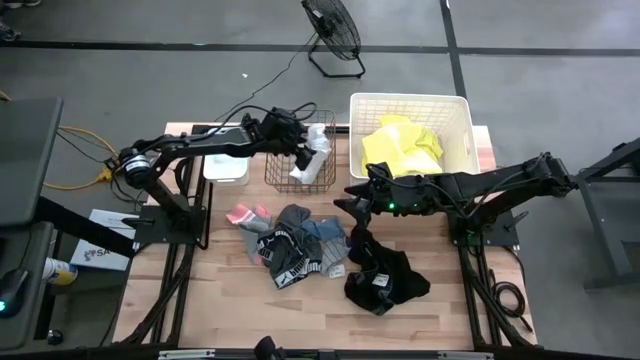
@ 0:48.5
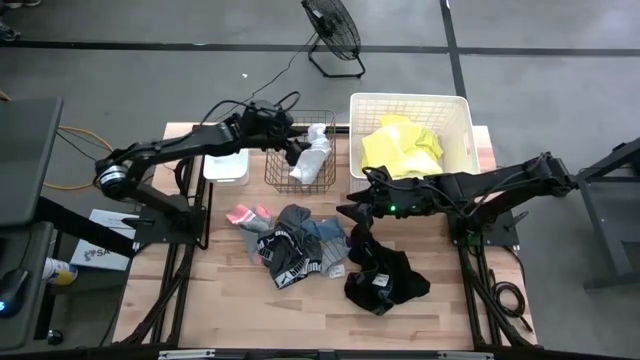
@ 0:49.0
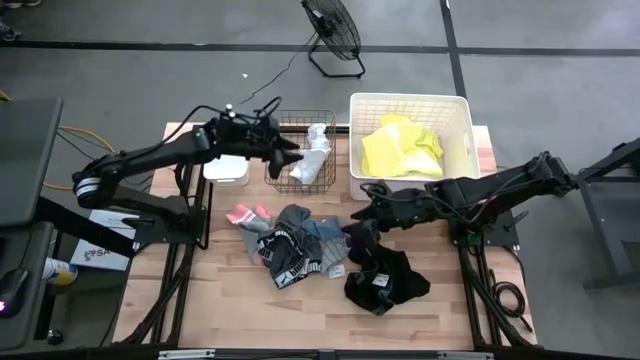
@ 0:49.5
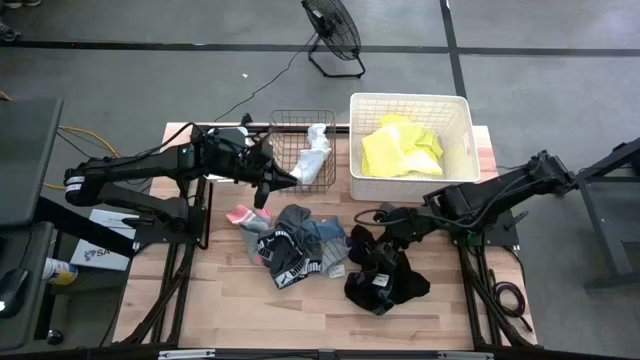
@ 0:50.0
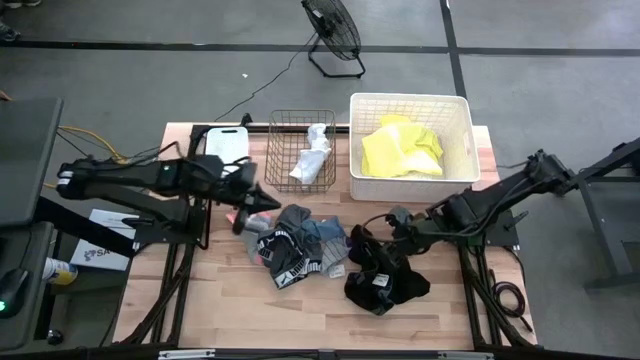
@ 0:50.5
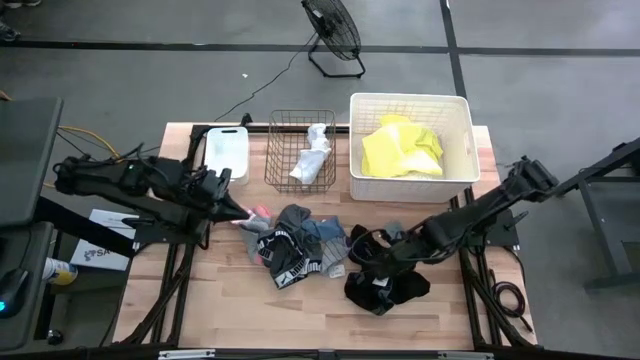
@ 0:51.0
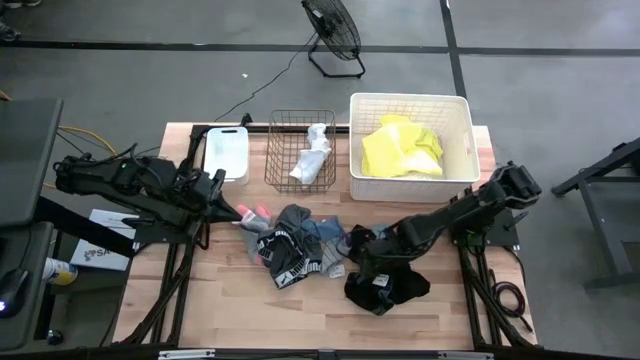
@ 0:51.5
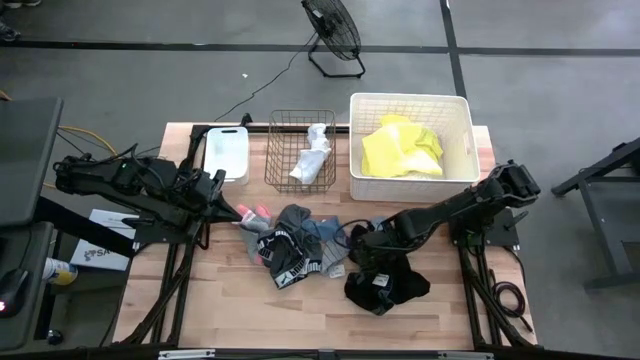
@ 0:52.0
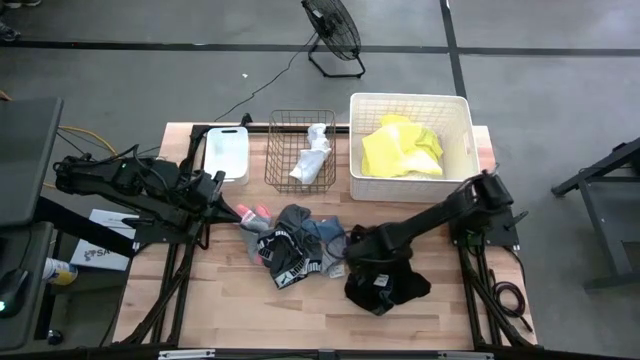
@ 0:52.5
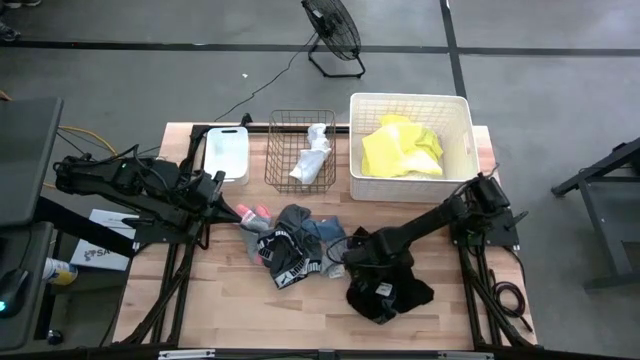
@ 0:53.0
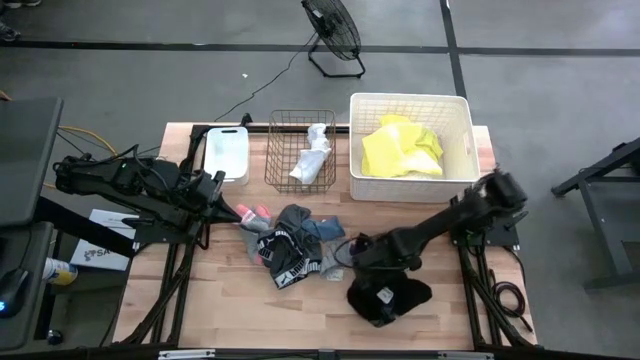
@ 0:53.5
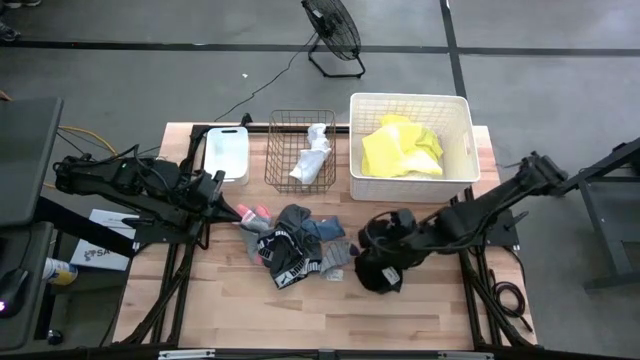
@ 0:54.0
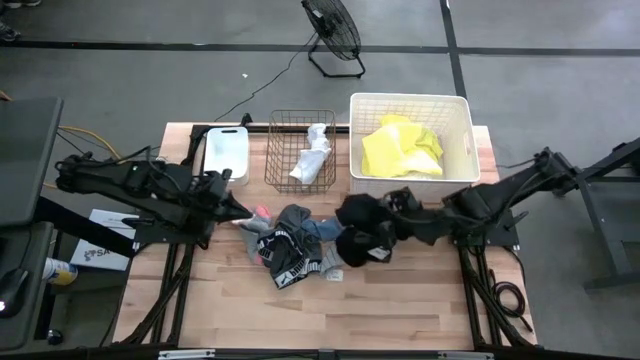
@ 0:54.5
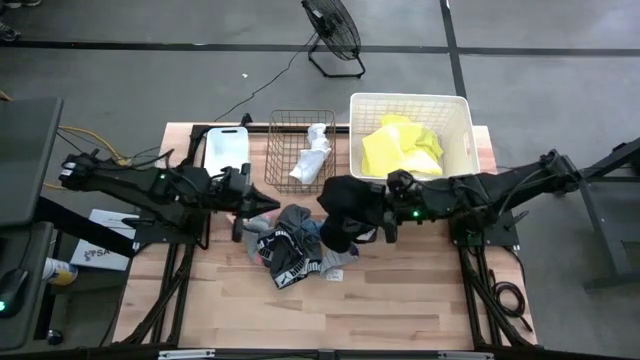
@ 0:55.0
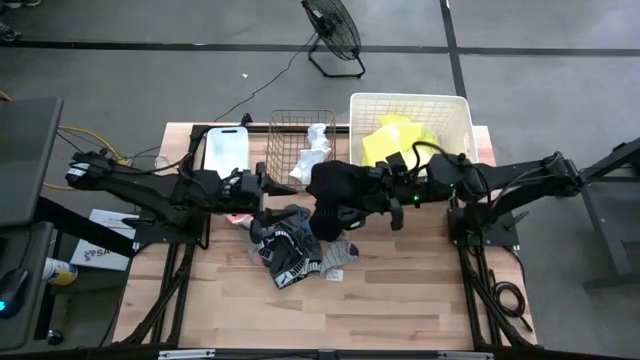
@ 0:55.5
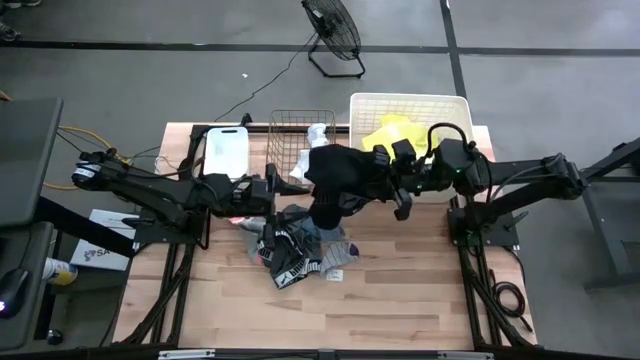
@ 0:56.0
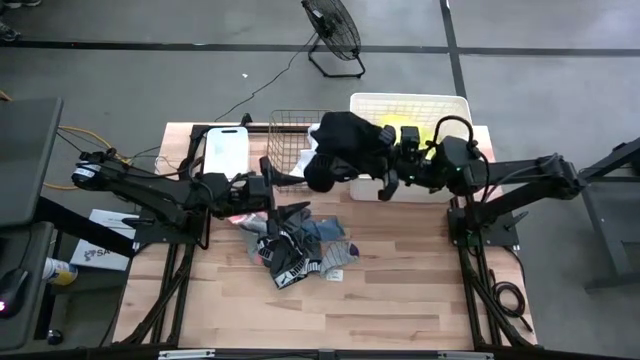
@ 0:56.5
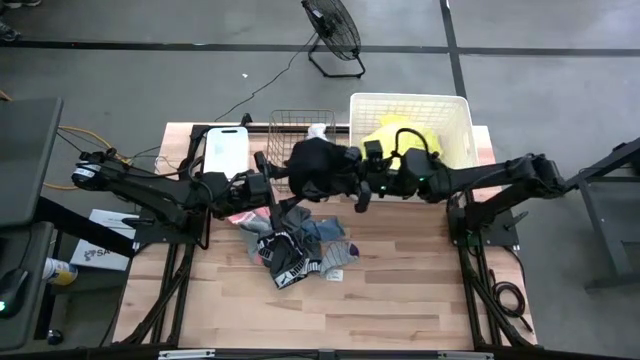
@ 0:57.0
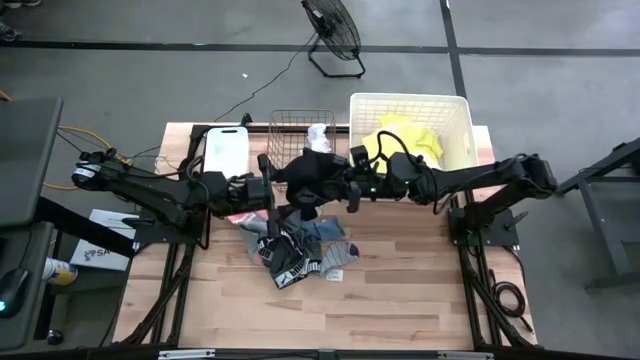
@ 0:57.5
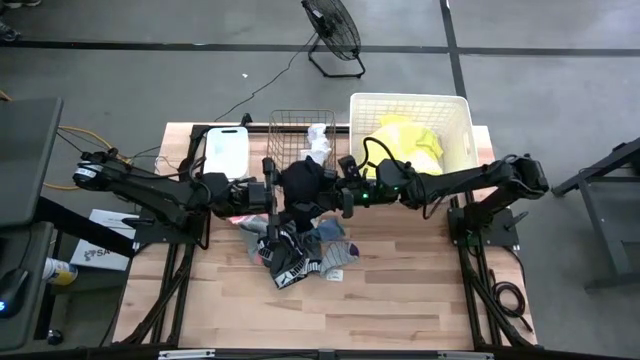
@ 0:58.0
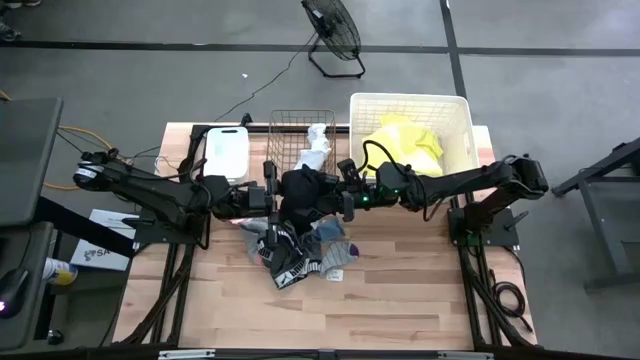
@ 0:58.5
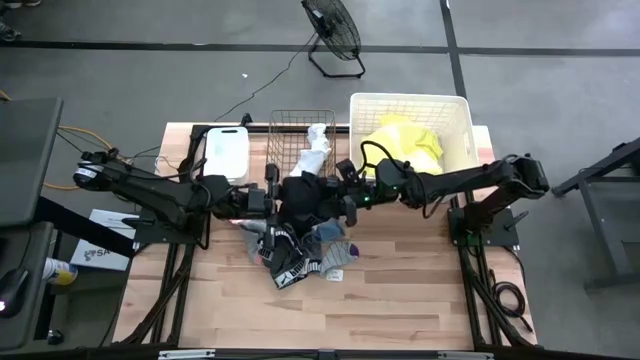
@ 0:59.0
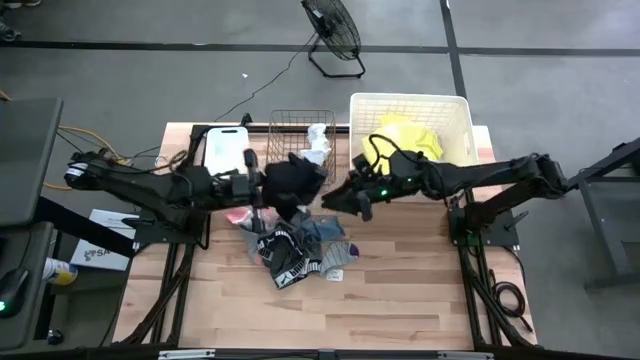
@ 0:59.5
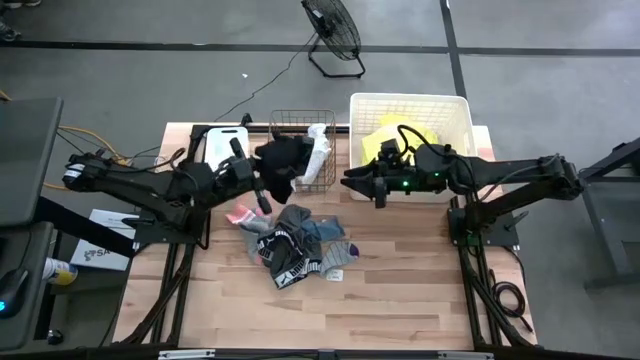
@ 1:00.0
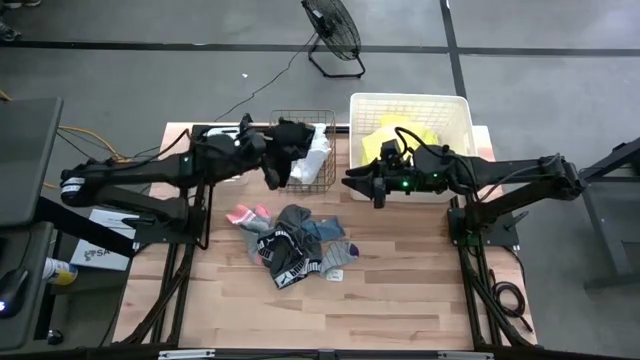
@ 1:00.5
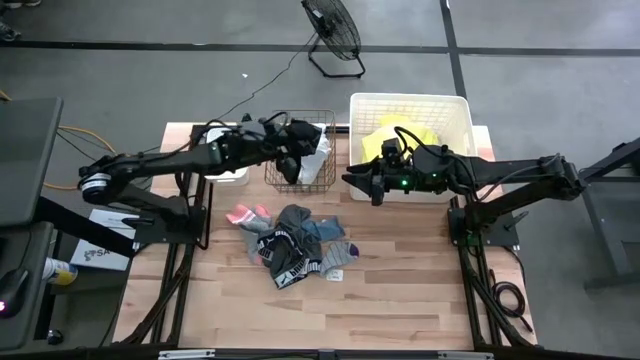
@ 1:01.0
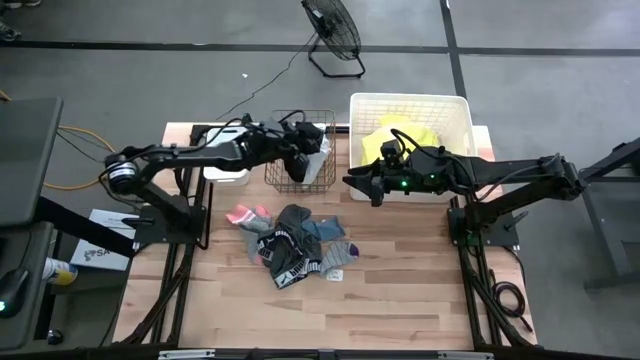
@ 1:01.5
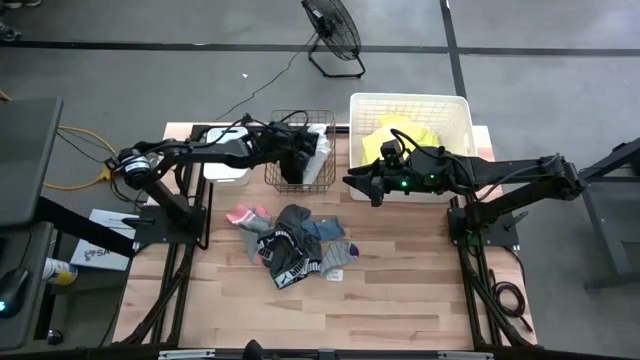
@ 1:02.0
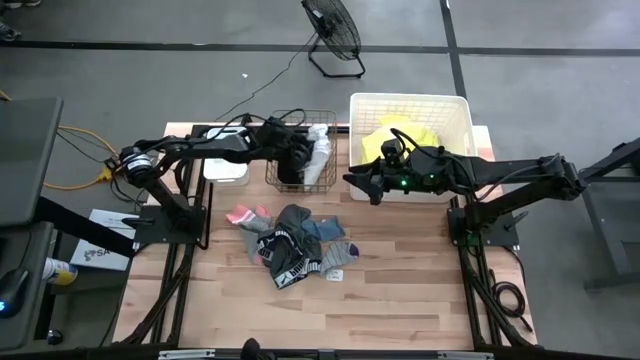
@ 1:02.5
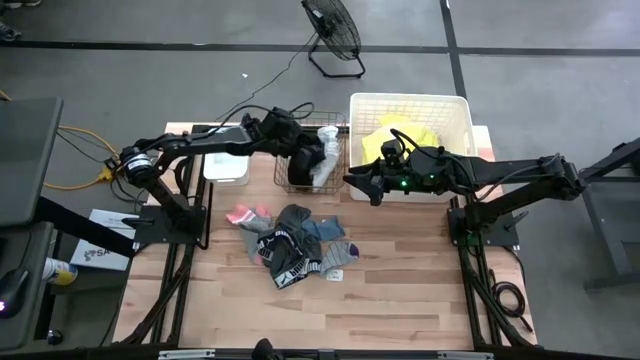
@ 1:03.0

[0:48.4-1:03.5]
Task: Pick & Place Cloths
Put the black underwear into the gold wire basket

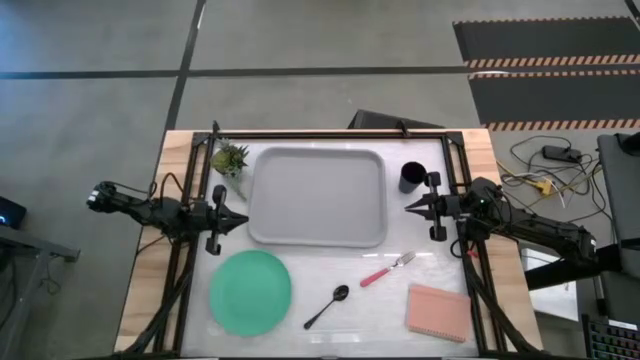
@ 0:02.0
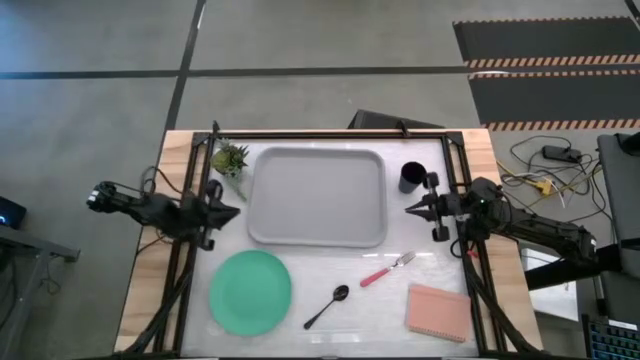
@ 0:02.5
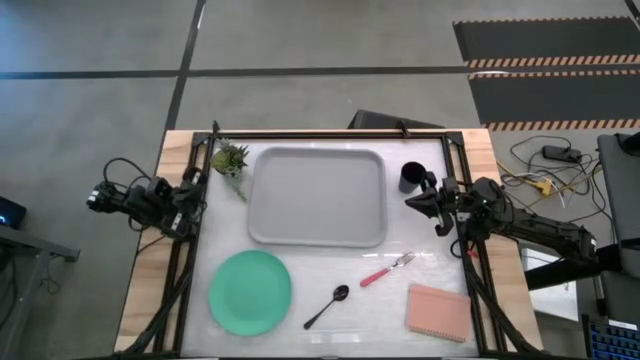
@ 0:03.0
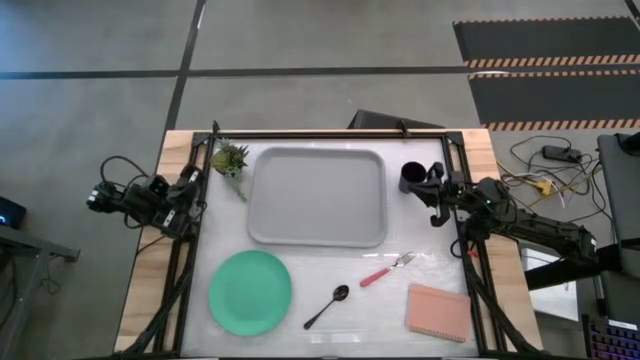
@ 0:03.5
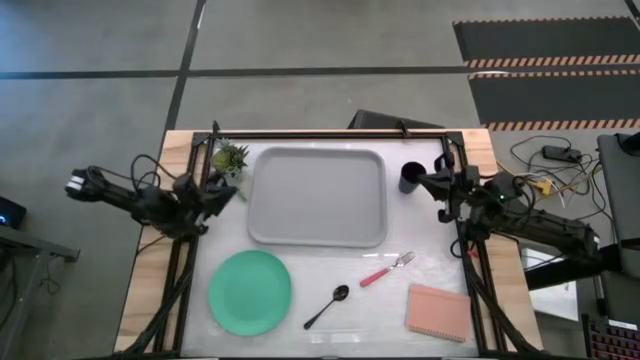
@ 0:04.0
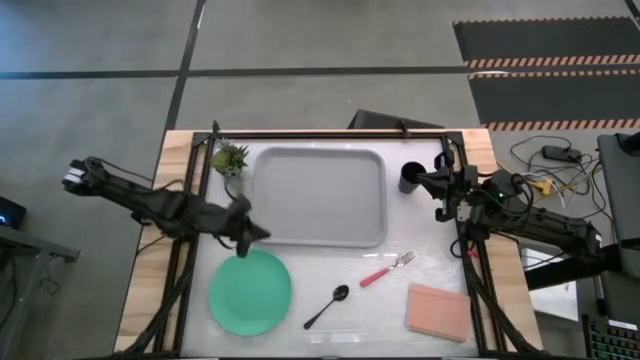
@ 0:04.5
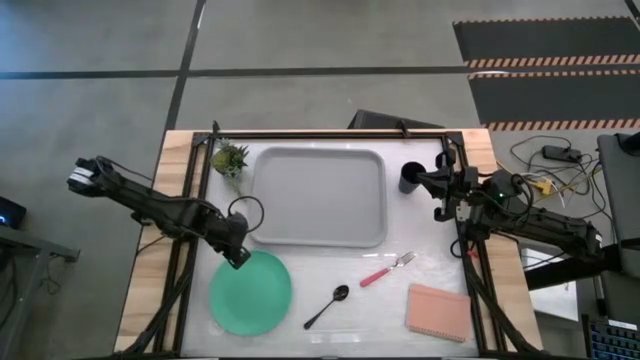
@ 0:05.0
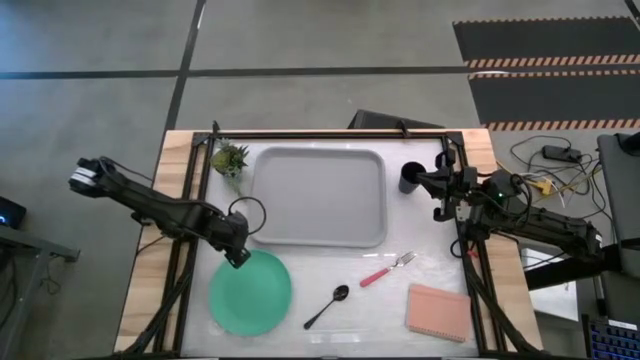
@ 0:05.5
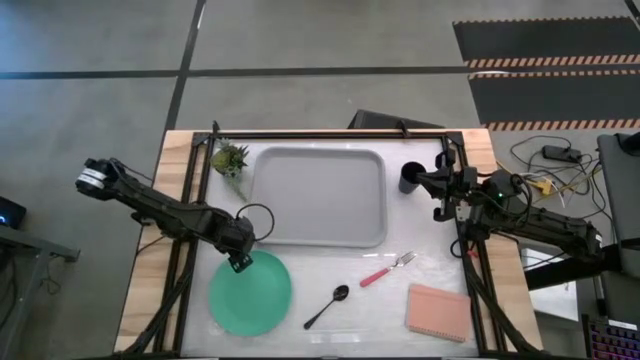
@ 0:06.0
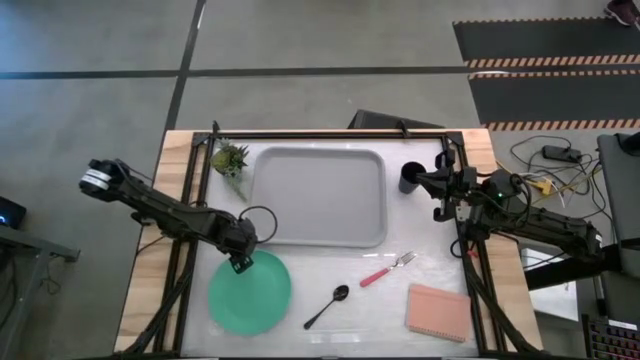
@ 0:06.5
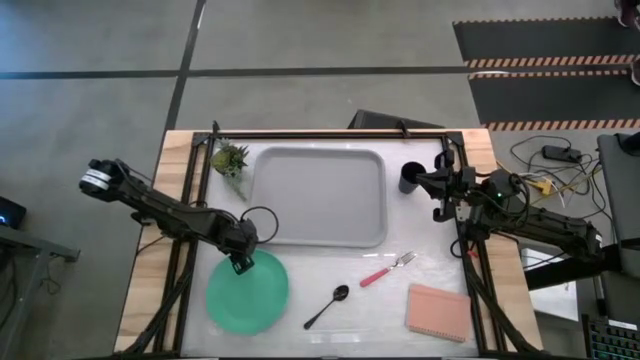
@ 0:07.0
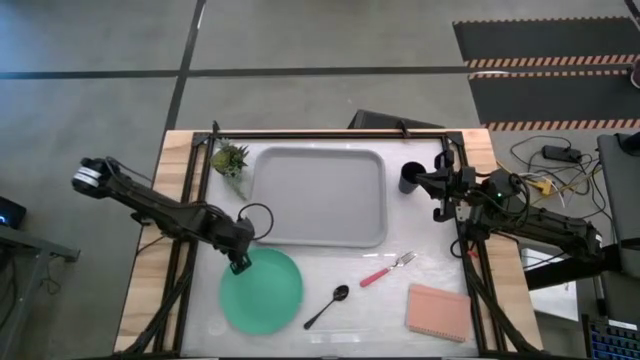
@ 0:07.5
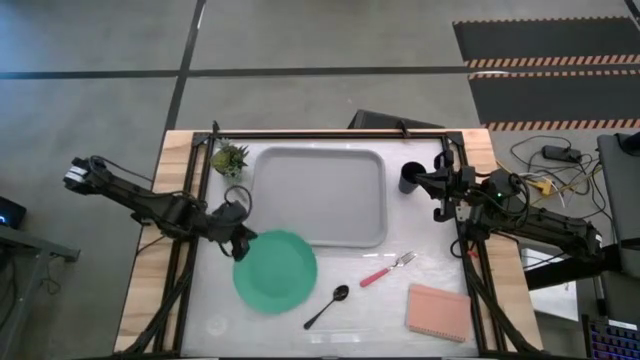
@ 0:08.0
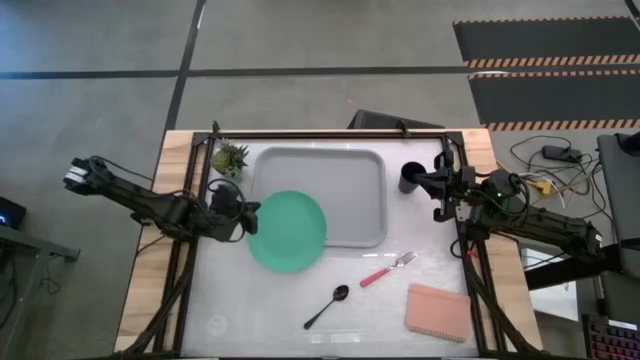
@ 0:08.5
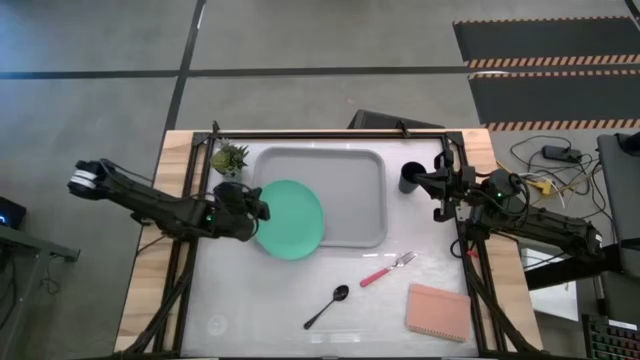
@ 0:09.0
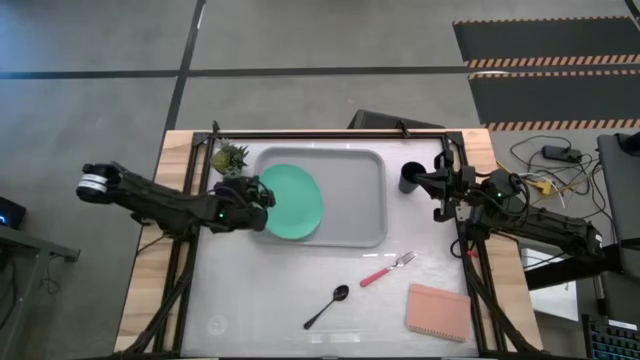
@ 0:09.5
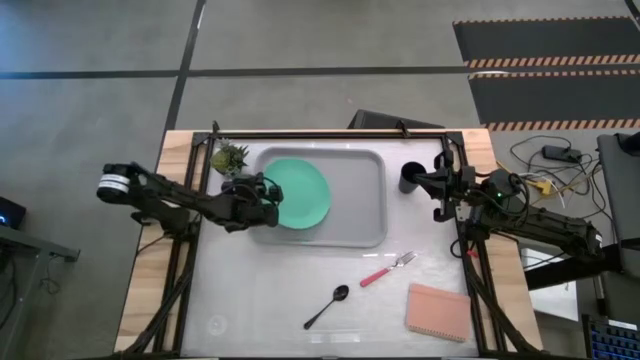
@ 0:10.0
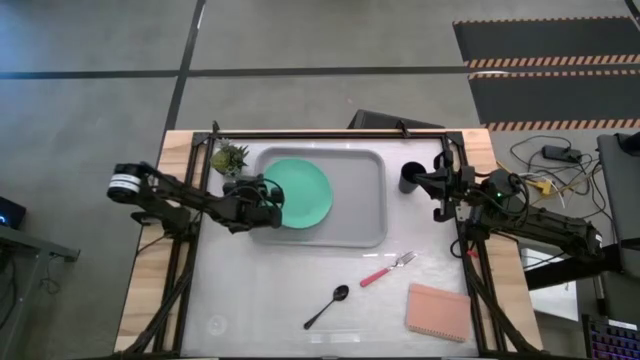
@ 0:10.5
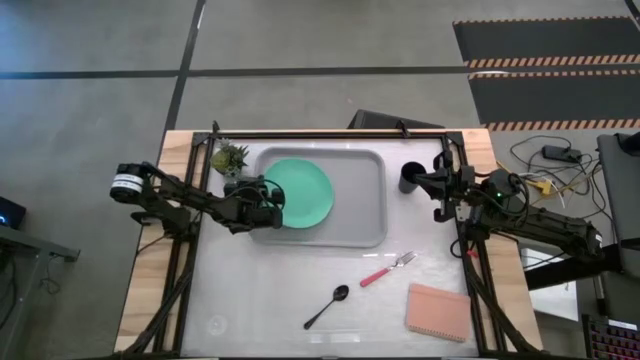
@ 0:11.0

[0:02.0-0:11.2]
Task: Pick and place plate/cup/fork/spoon on tray
Put the light green plate on the gray tray
